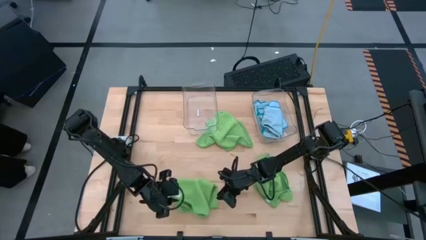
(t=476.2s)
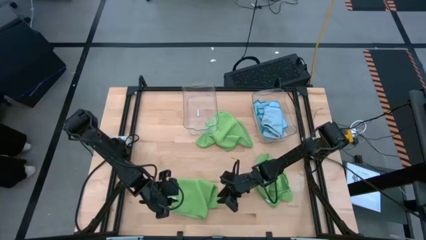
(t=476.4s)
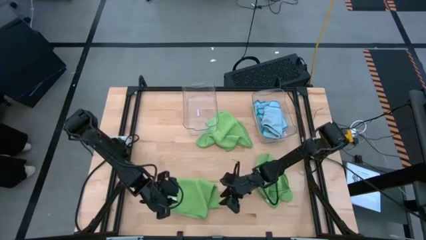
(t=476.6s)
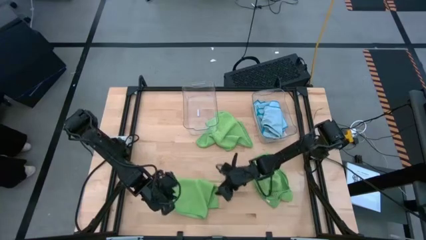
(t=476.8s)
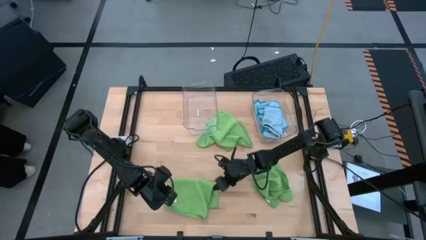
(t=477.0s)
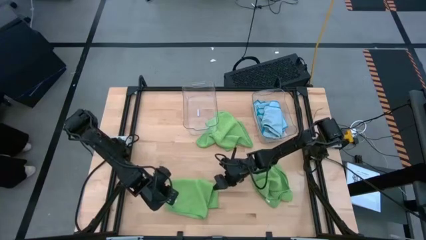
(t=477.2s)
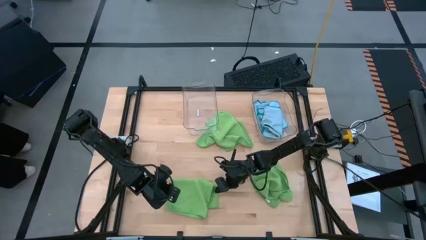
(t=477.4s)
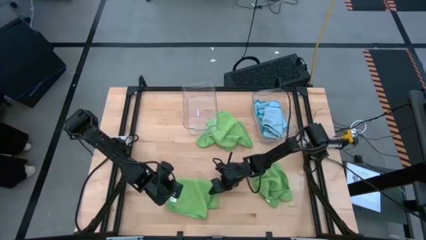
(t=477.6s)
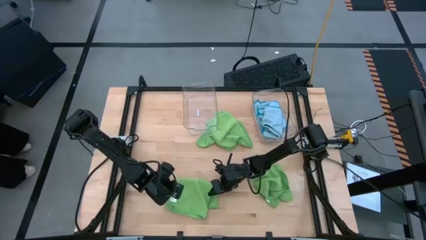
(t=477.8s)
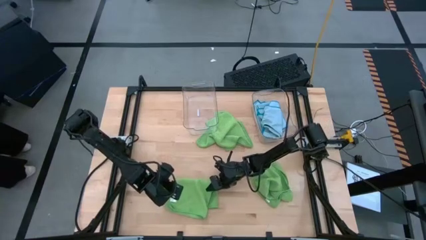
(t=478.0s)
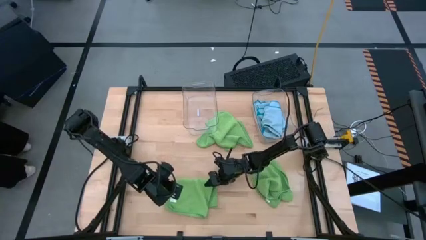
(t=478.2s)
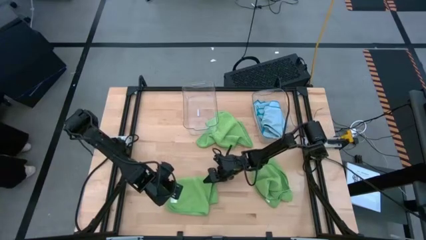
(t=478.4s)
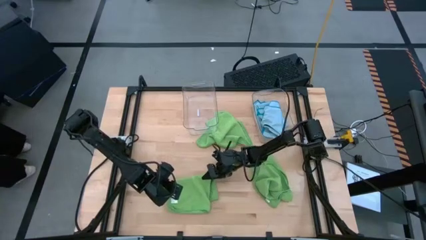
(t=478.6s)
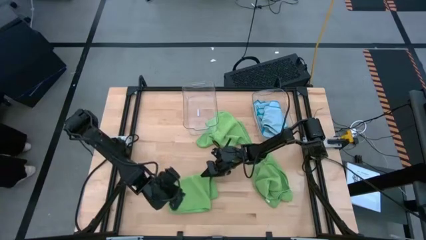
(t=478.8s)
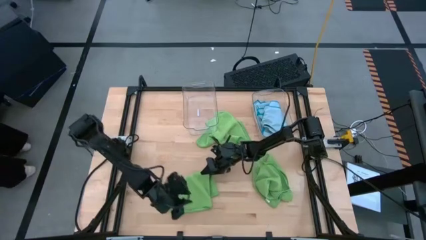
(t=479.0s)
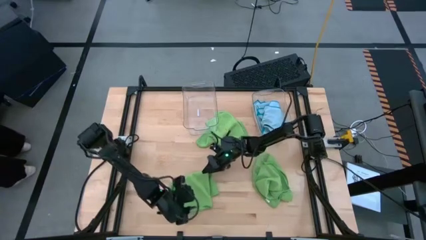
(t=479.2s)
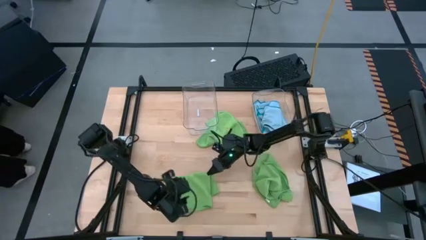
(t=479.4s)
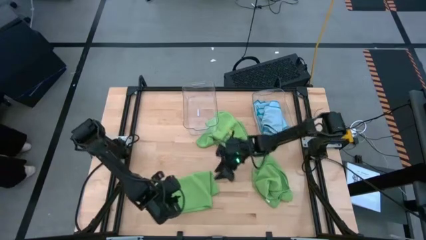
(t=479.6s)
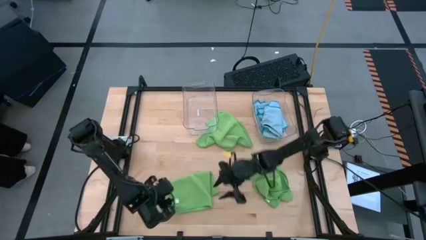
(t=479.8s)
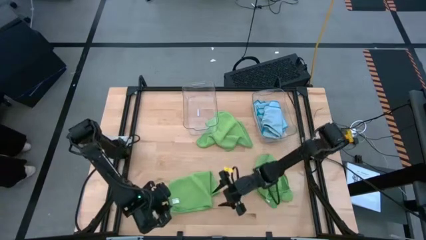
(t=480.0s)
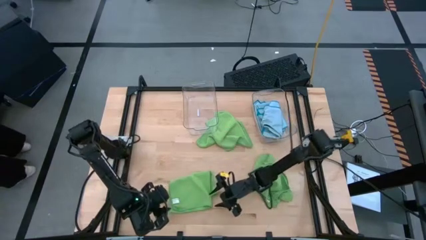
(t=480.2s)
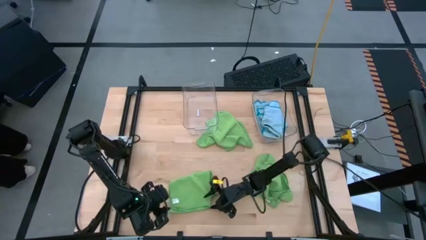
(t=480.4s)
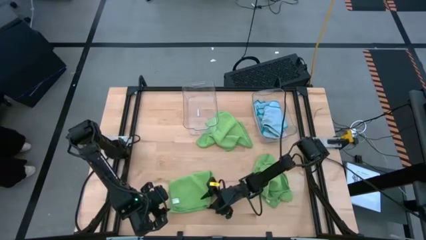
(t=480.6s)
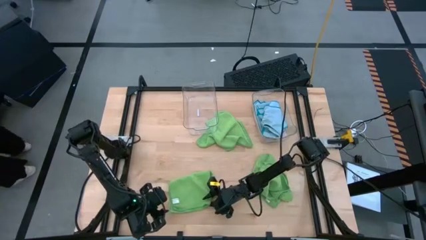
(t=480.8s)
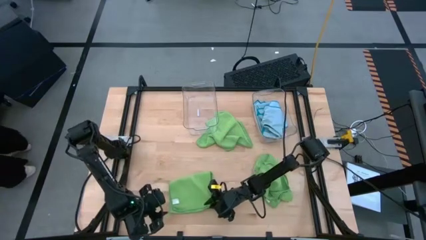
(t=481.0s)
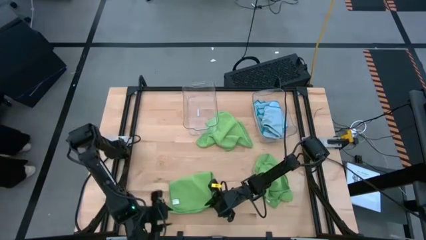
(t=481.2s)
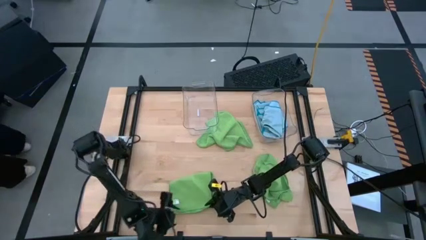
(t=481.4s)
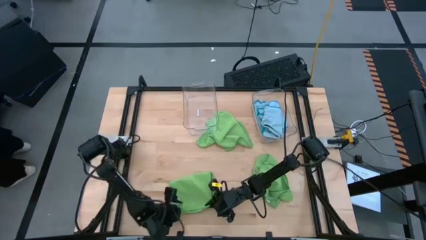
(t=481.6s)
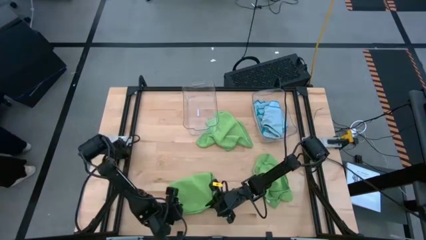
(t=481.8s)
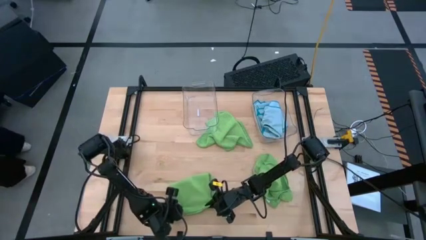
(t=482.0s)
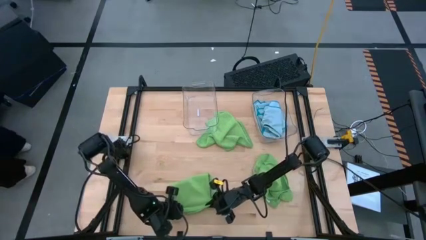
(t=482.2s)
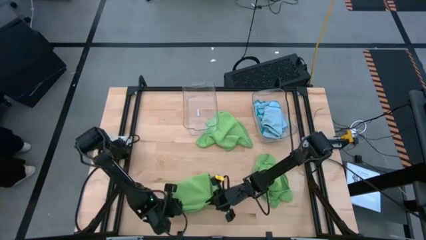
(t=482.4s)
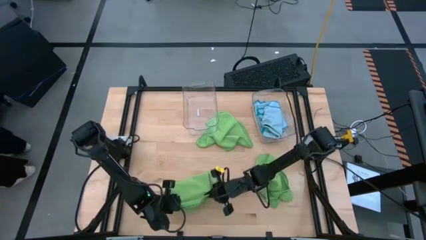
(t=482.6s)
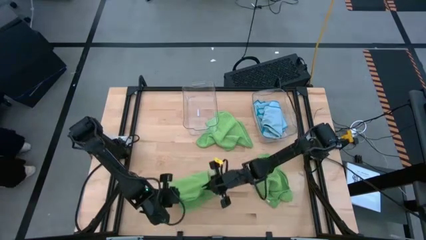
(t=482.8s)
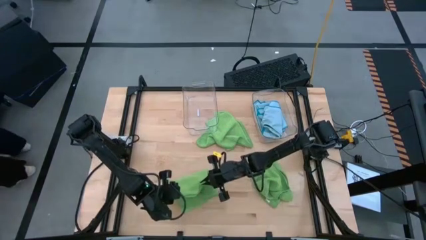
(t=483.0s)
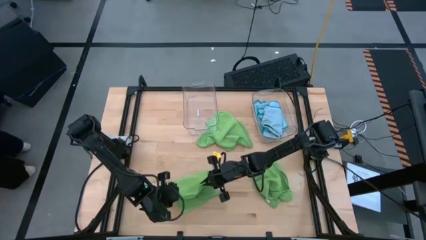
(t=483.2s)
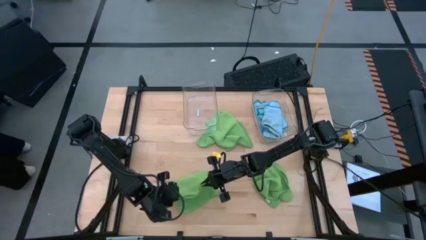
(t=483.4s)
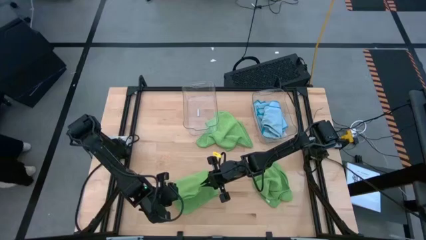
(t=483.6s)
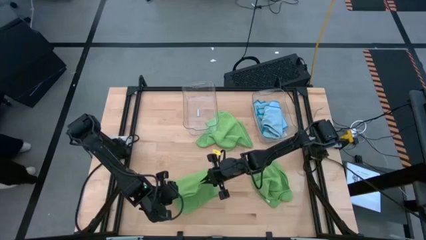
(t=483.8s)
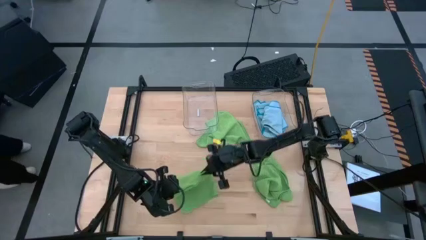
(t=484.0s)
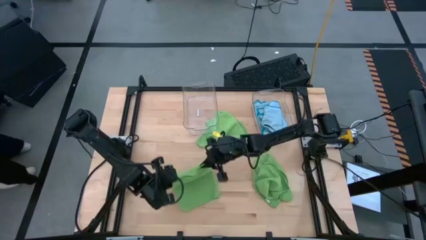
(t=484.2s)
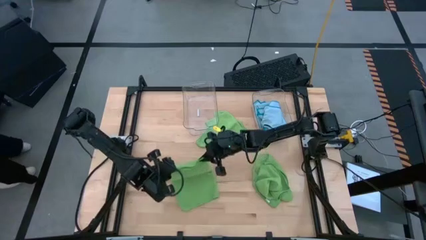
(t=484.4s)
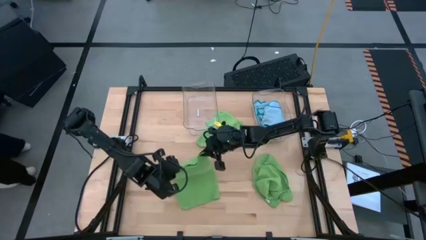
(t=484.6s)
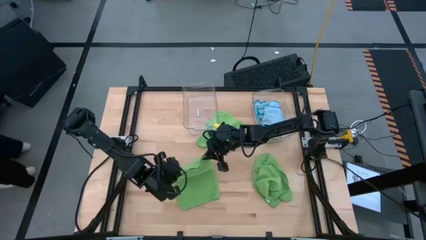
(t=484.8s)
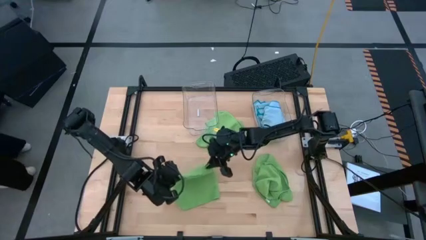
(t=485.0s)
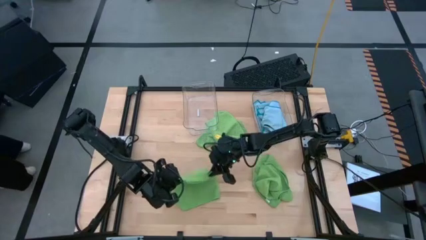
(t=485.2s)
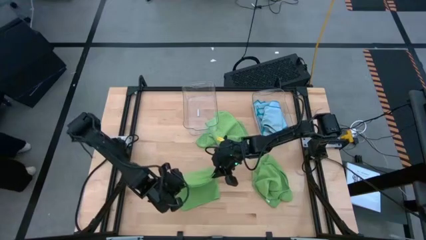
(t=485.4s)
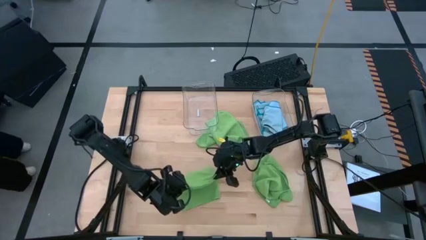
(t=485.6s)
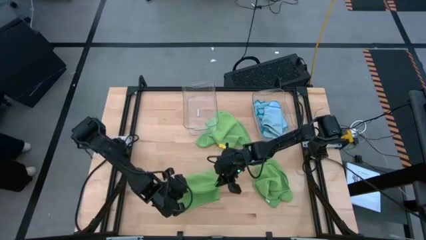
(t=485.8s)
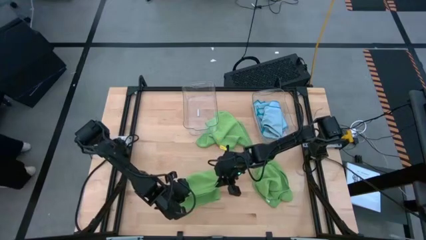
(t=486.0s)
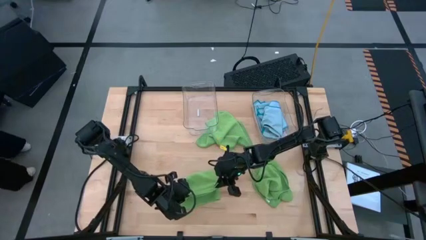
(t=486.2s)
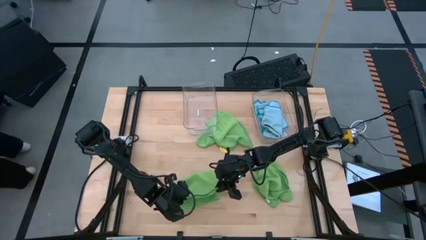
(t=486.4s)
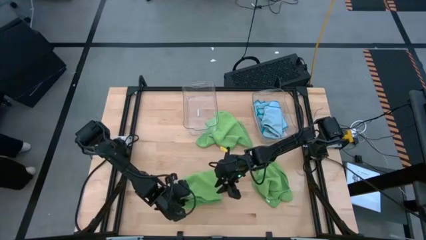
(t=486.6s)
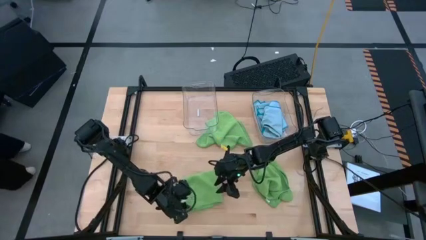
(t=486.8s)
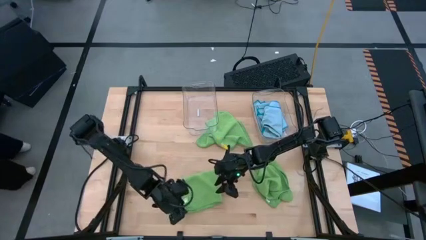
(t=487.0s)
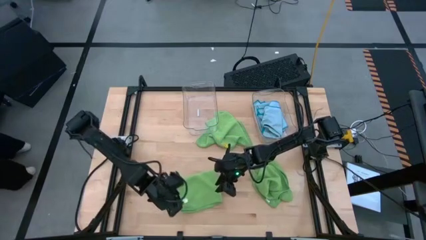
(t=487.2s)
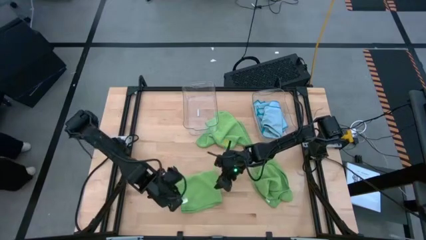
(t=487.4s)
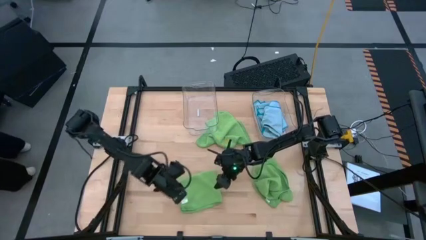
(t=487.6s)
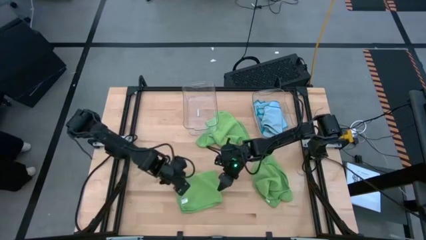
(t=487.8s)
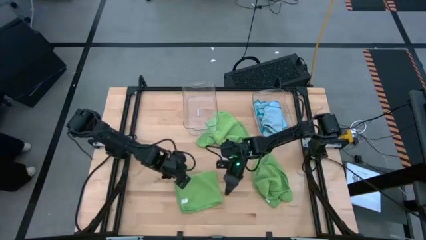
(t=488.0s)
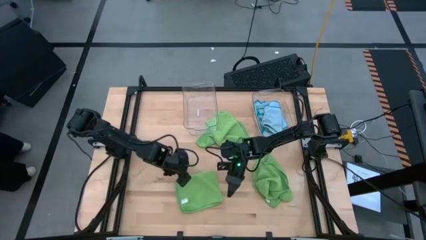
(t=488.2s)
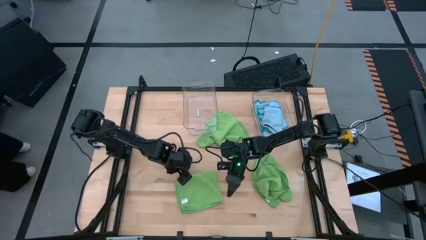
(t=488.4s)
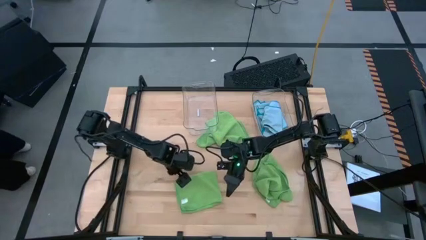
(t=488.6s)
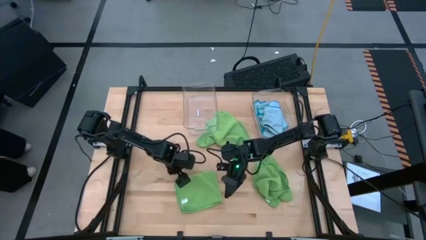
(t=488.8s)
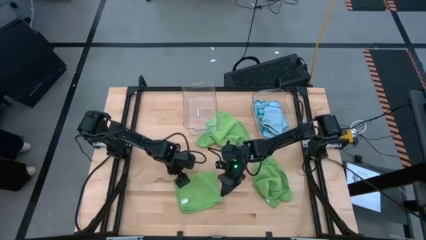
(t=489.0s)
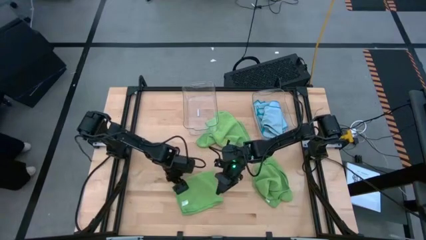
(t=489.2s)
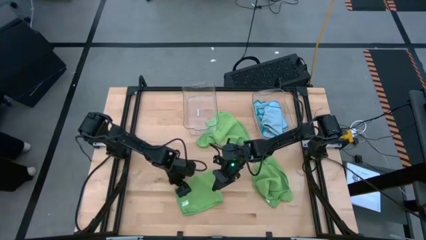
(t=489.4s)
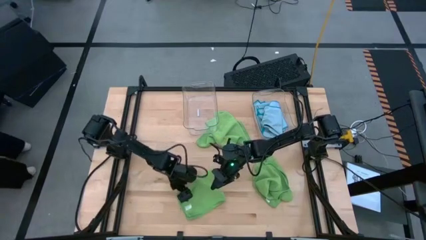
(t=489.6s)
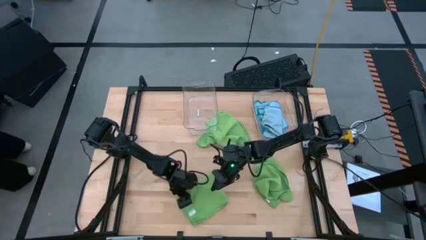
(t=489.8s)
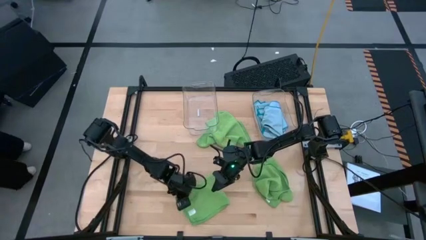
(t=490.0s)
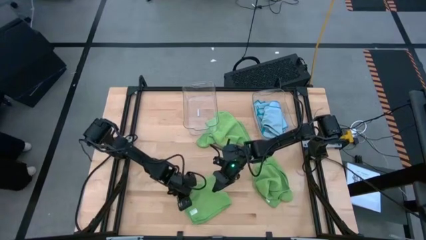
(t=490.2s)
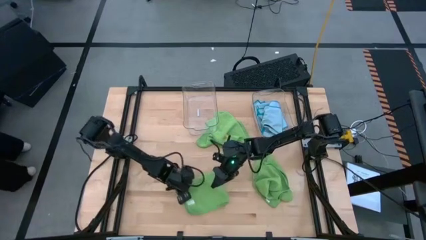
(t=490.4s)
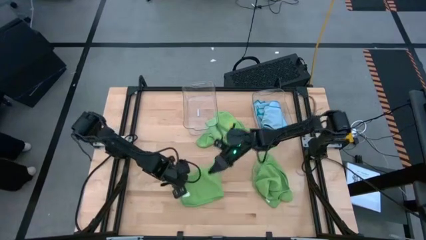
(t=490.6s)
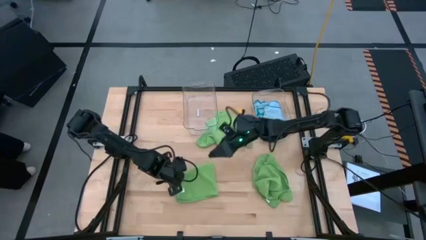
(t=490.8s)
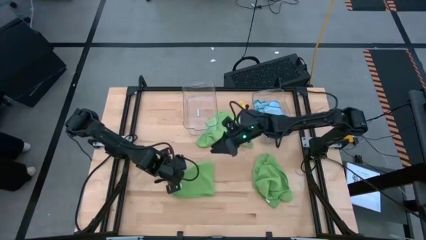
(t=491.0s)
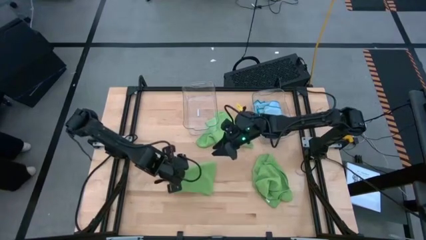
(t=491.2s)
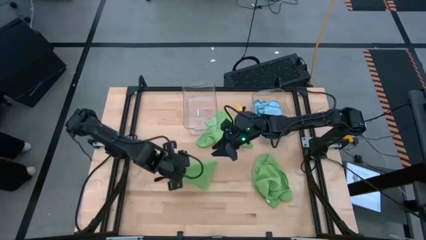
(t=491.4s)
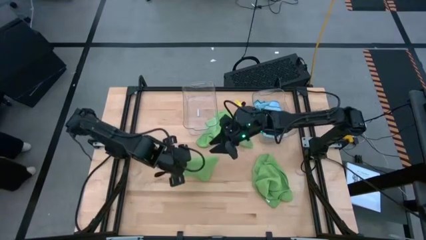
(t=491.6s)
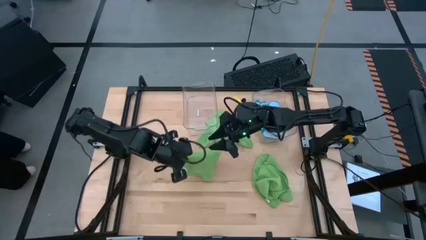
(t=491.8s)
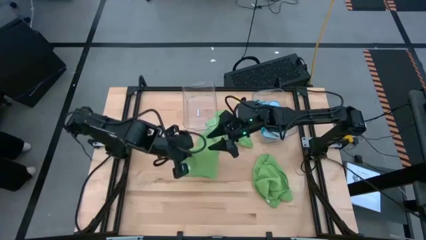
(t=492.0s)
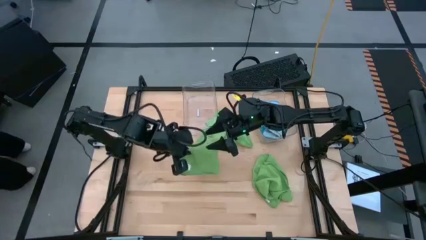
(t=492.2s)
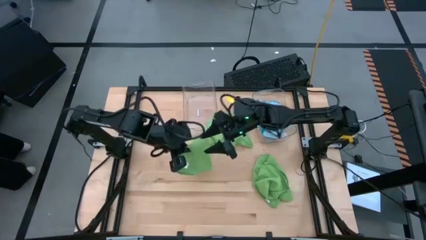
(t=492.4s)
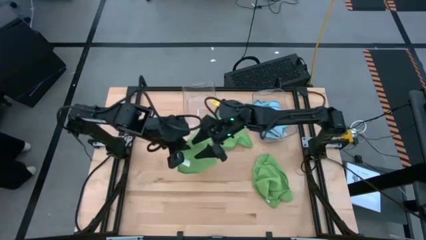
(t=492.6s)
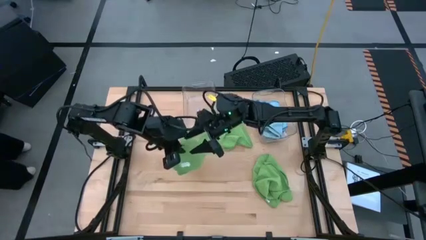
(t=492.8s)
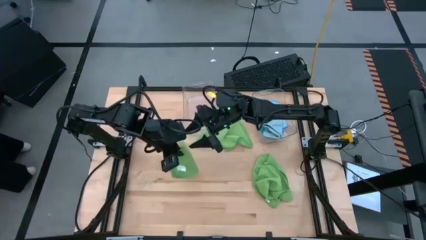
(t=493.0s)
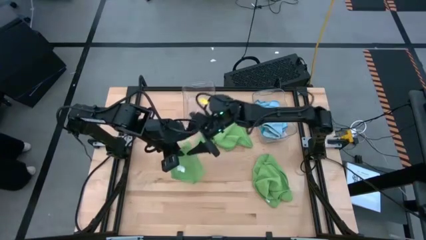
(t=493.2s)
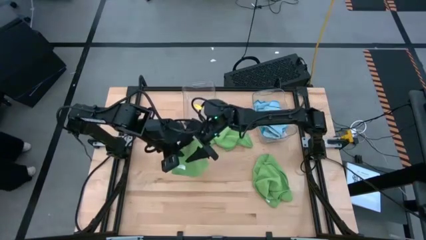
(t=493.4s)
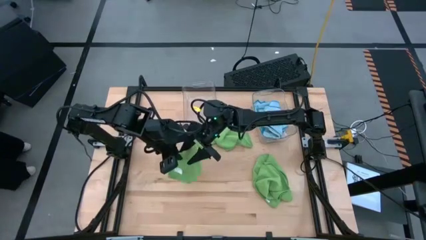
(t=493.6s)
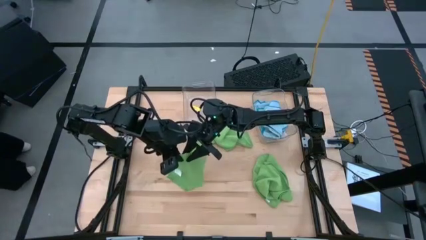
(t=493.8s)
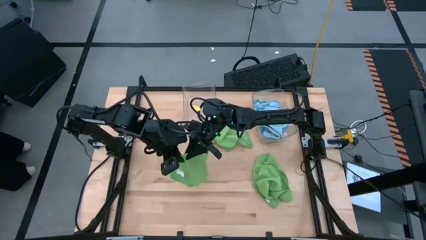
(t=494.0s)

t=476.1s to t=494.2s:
Task: Fold microfiber towels
Fold the bottom left green microfiber towel
